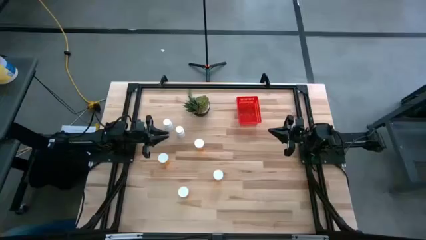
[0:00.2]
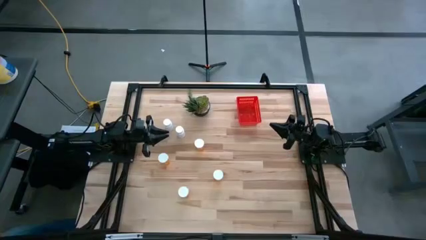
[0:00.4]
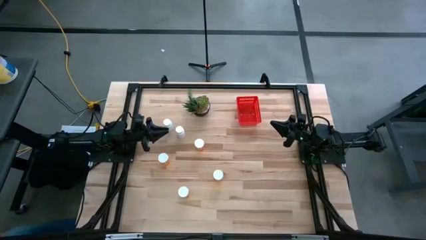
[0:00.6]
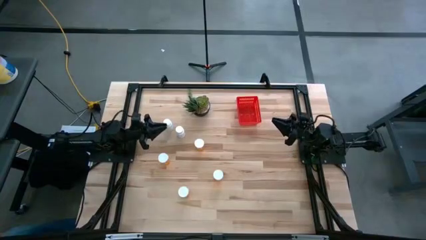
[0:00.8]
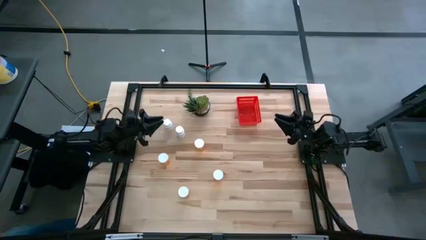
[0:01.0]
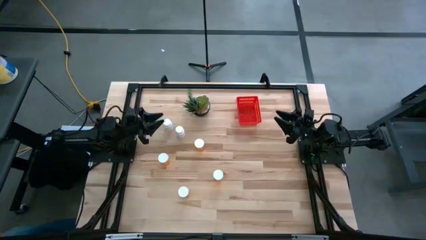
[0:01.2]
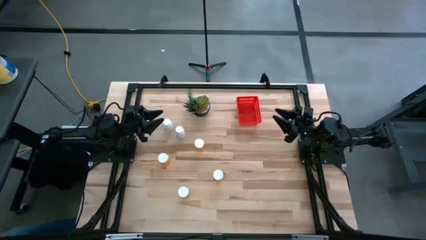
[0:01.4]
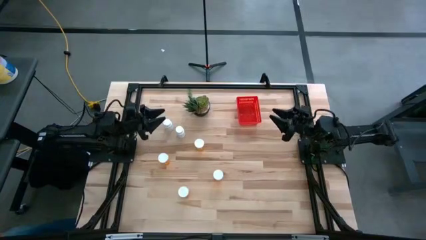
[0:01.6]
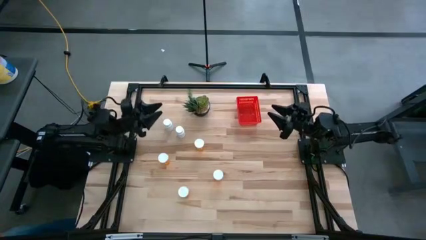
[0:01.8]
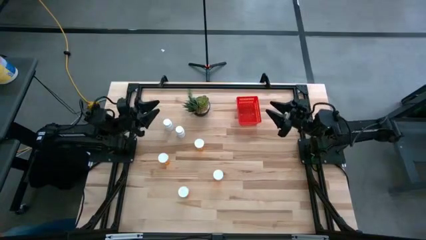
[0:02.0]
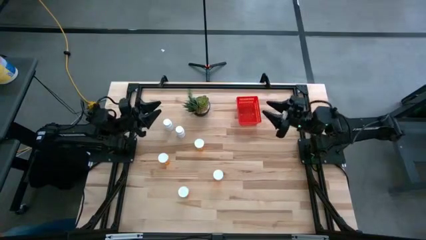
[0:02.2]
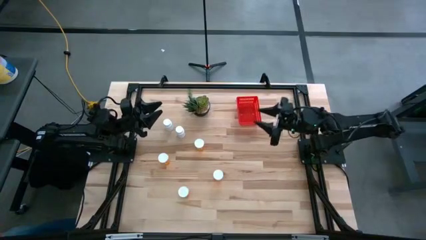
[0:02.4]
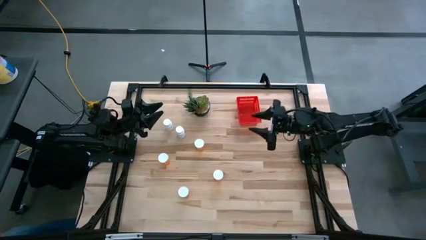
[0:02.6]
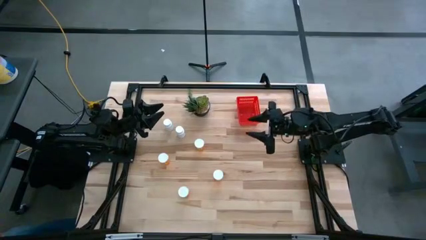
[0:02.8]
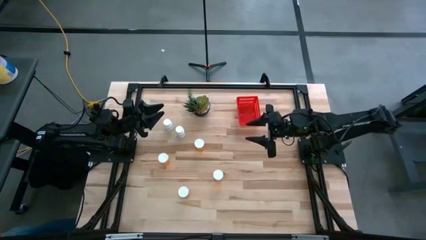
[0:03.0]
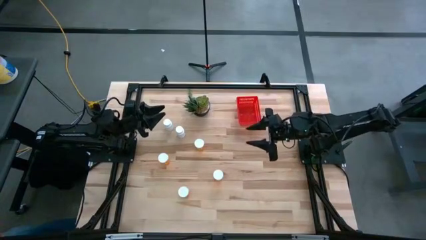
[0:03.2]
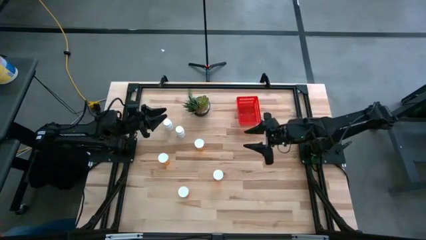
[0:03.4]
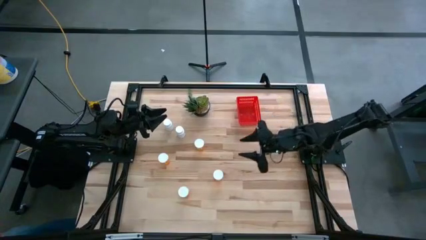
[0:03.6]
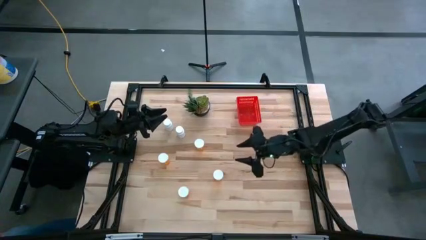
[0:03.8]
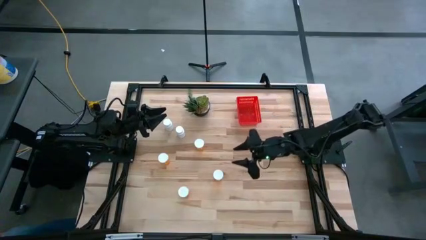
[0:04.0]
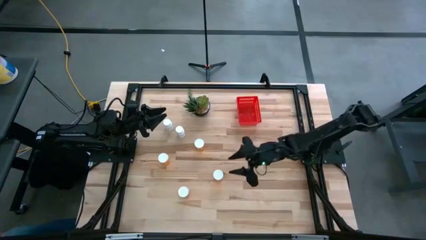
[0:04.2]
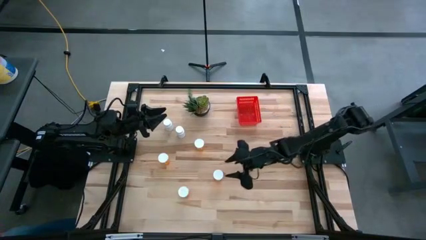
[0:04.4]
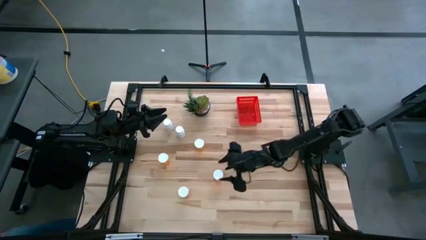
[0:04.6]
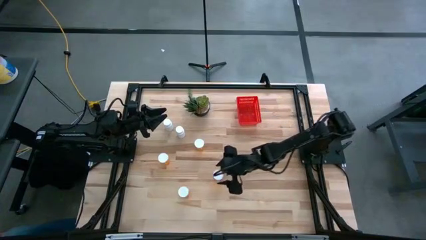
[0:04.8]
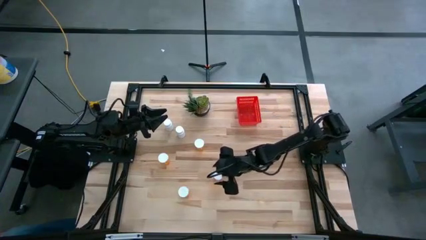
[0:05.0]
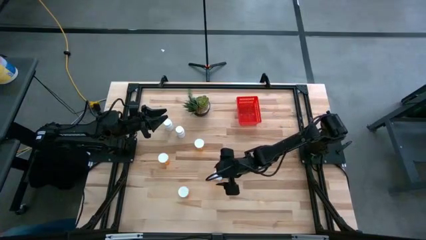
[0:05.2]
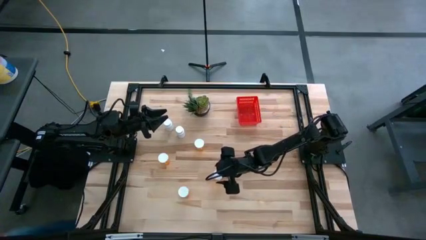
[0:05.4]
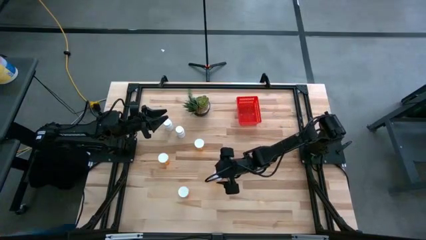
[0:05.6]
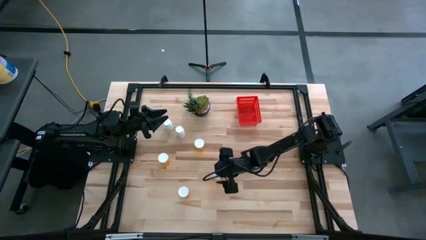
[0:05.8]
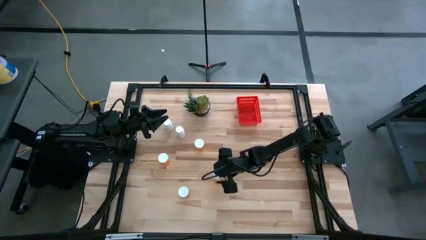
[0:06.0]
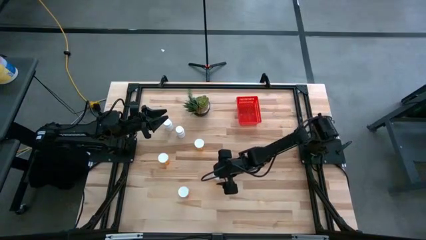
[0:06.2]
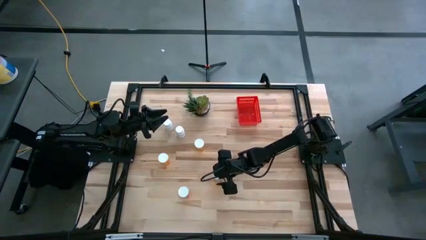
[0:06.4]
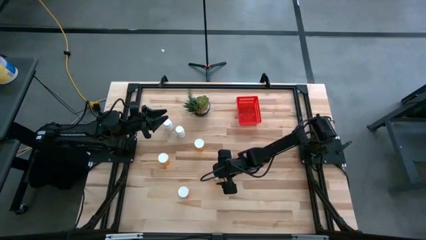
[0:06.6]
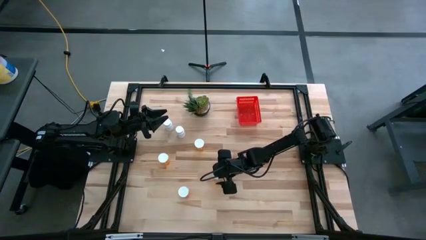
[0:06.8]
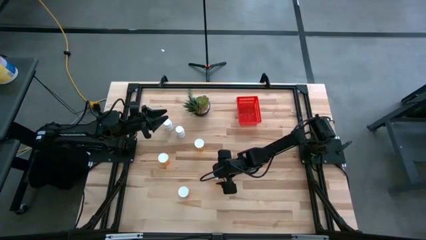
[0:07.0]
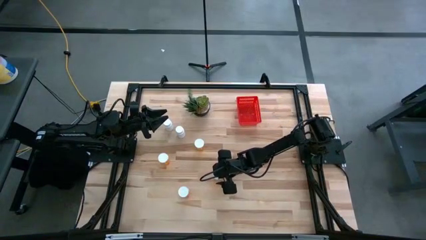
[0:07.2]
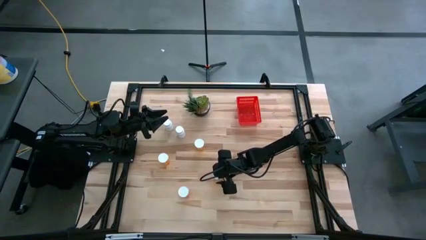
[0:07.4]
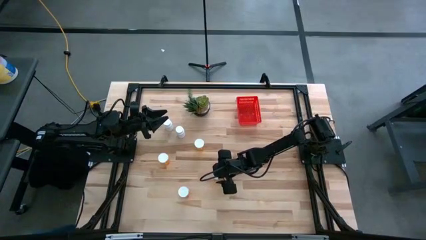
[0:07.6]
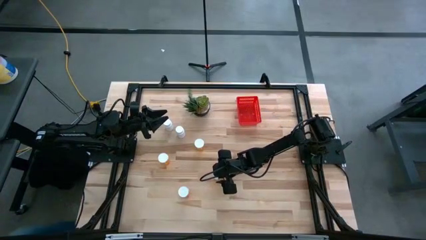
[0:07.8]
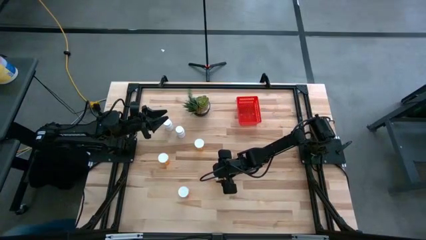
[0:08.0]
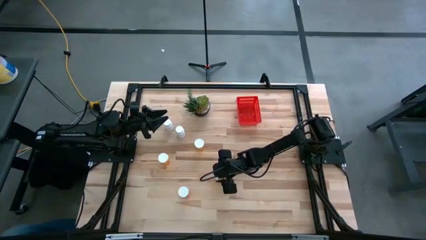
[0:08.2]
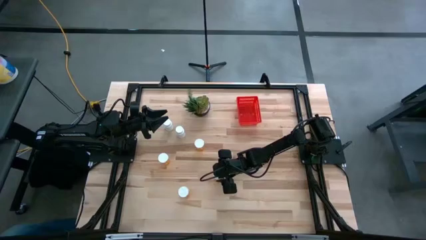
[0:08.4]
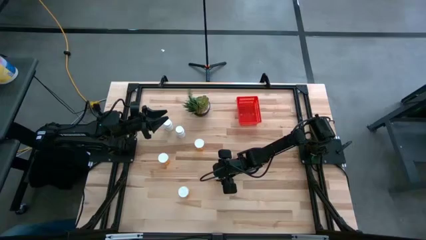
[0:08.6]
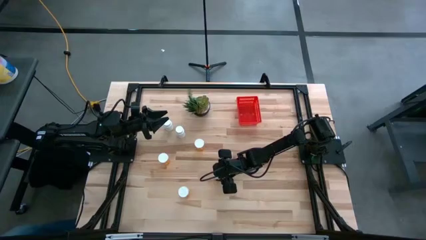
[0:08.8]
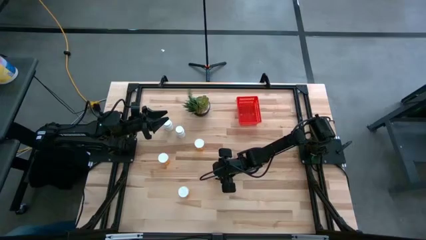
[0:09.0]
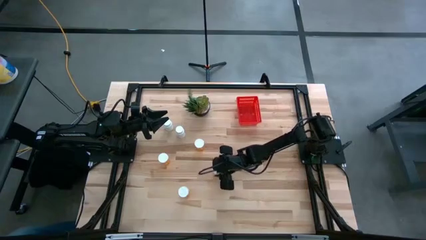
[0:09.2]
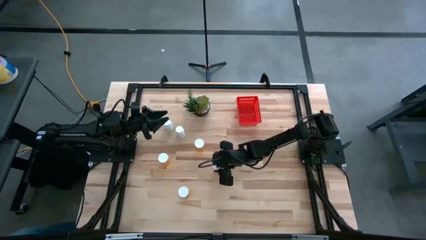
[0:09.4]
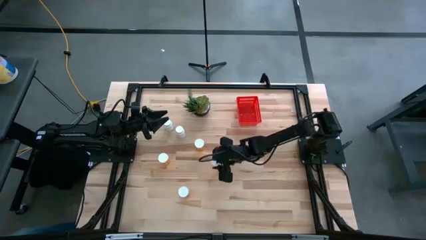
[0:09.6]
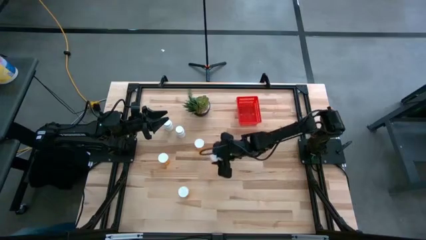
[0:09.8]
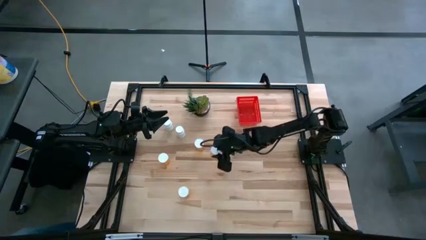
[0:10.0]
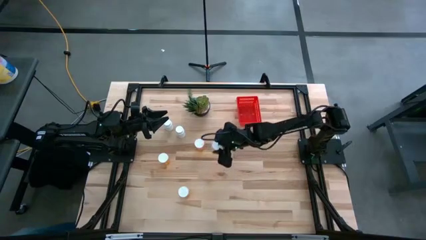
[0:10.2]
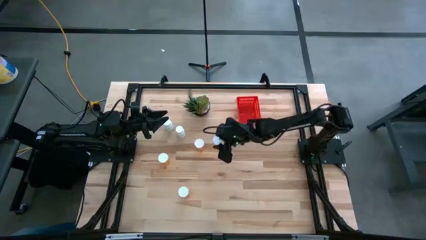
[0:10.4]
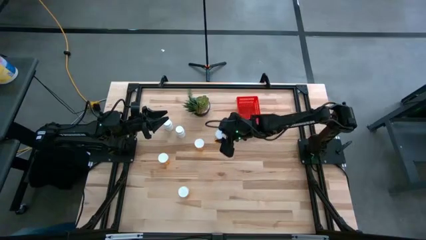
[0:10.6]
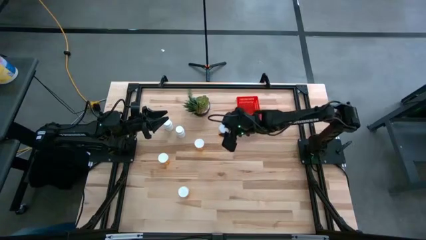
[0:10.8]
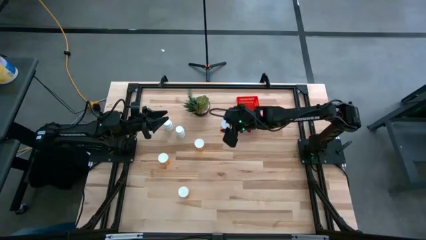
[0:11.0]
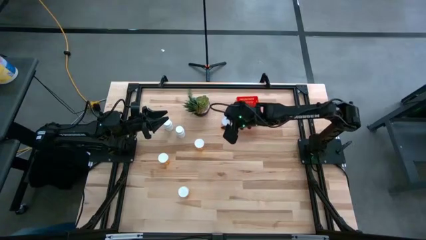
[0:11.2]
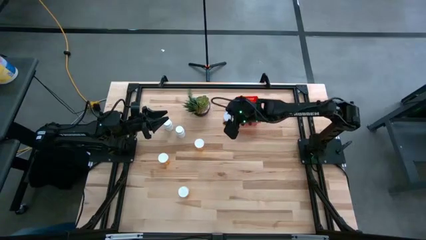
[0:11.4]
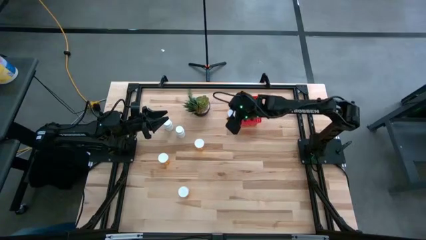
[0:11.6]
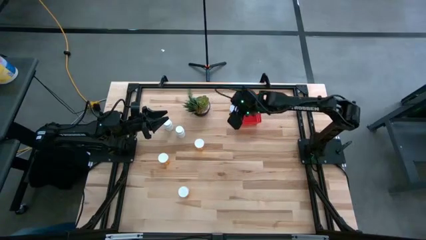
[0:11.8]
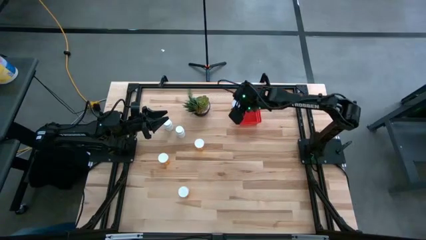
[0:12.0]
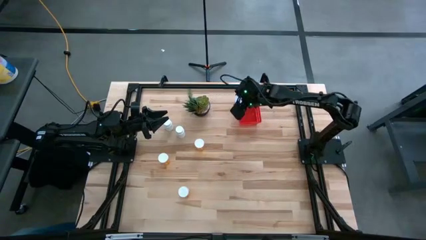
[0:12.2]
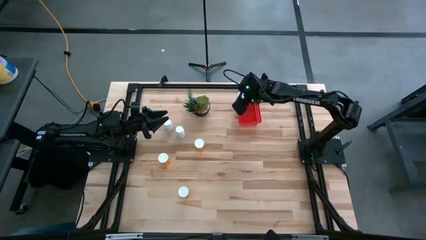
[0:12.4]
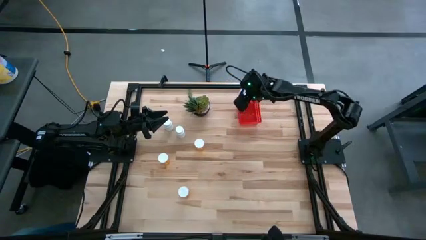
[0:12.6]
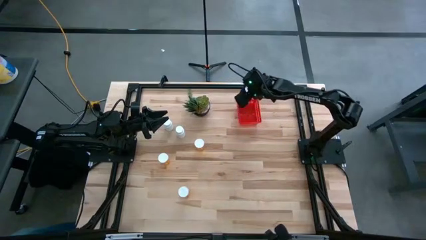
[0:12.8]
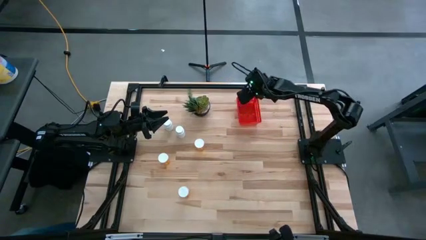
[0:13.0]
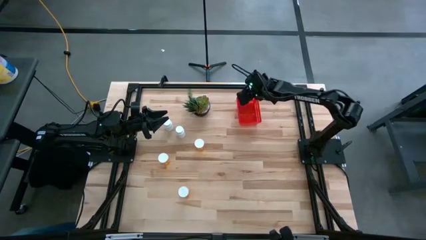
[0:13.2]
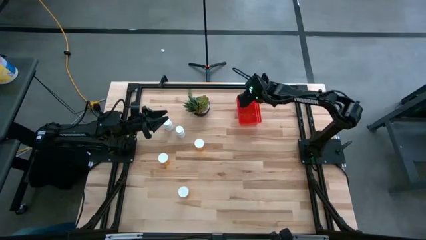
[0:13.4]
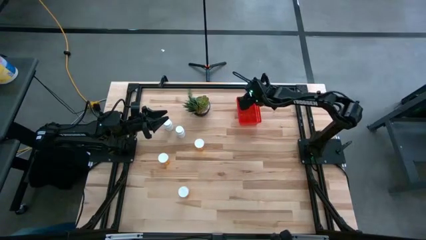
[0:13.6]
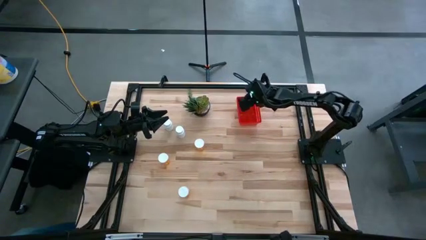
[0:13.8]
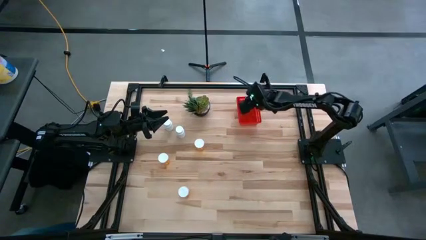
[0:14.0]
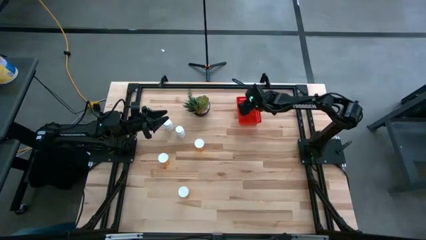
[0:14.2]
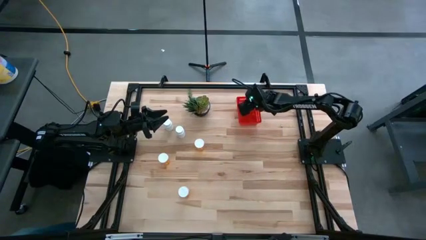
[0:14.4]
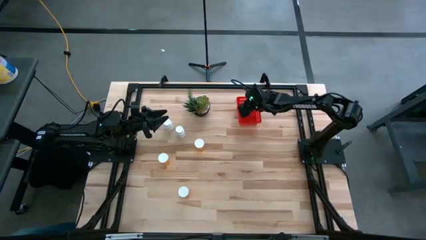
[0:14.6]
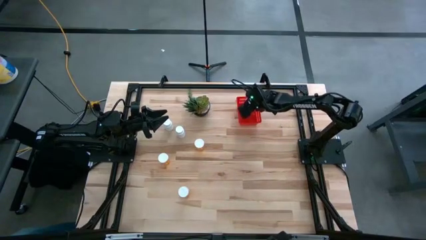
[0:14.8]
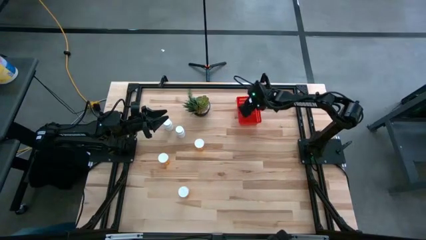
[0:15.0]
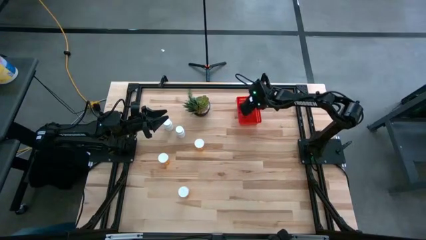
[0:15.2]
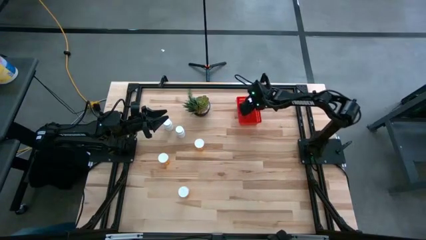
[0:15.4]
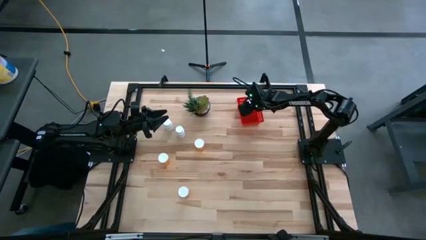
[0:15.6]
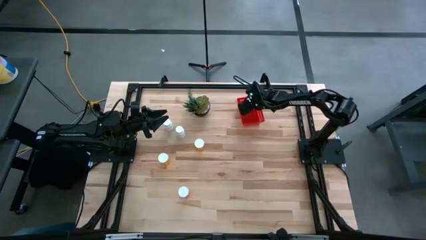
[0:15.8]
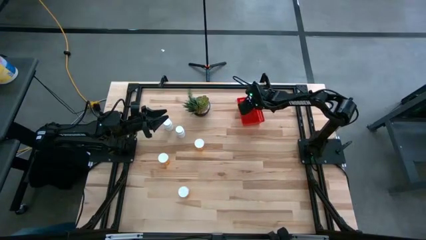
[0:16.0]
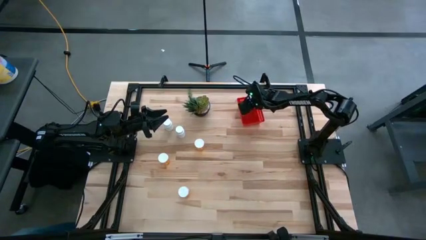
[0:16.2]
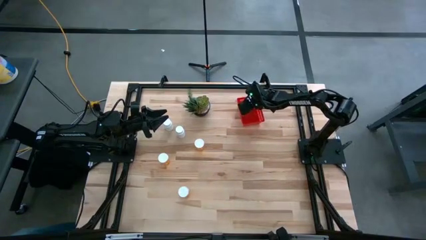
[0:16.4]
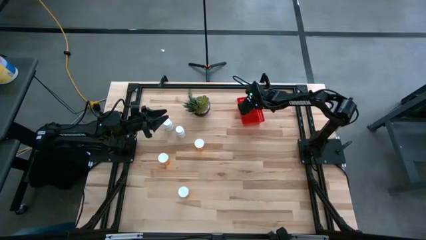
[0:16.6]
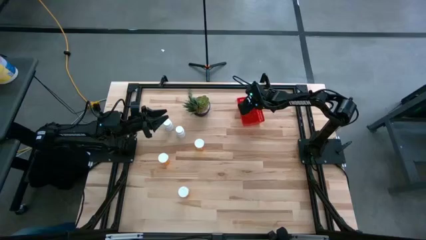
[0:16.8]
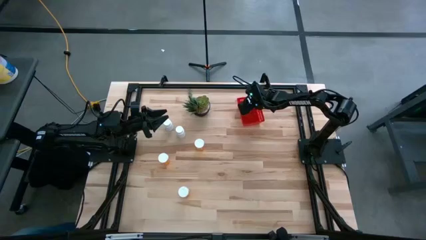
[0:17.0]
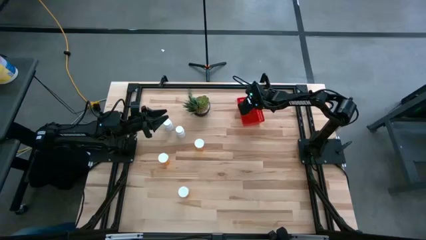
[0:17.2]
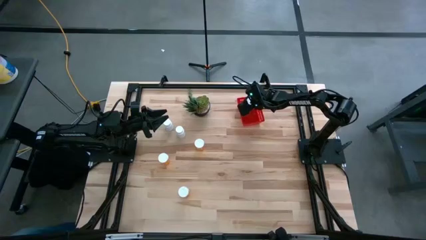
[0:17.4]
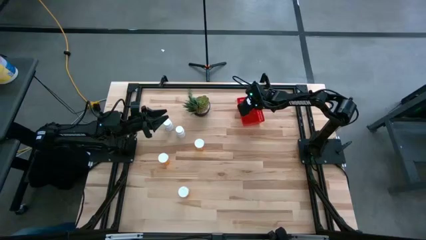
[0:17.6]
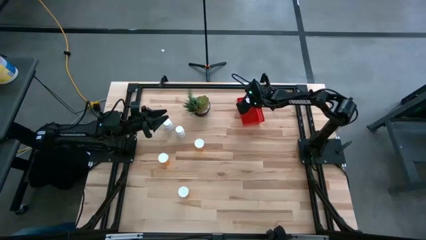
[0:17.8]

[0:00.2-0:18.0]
Task: Pick and place pill bottles into a basket
Put the orange pill bottle into the bin
